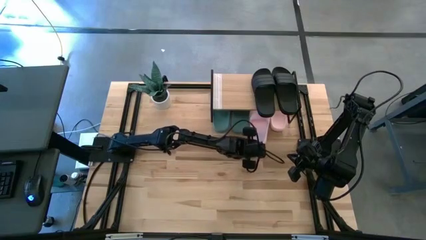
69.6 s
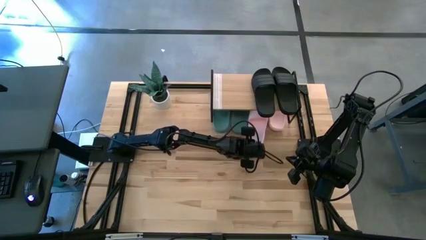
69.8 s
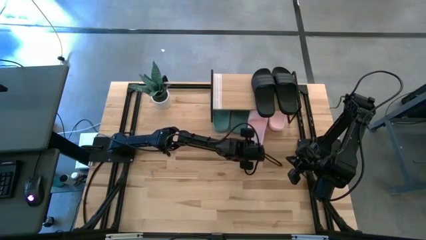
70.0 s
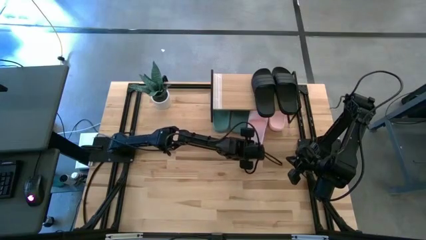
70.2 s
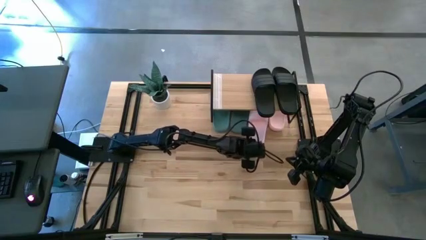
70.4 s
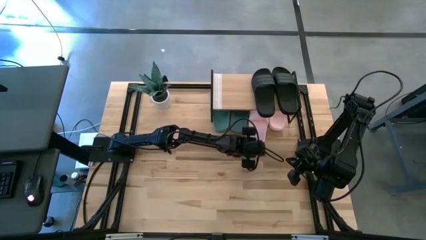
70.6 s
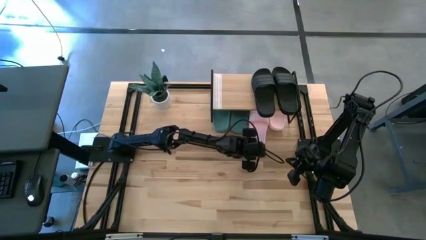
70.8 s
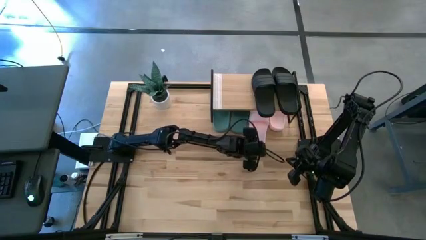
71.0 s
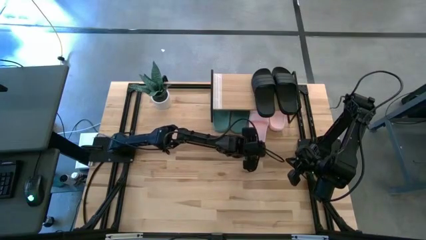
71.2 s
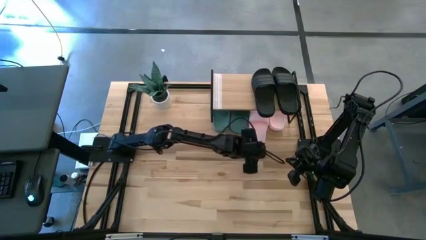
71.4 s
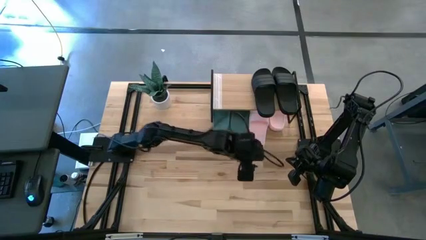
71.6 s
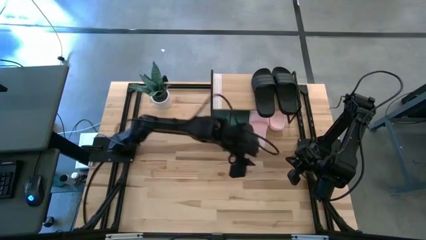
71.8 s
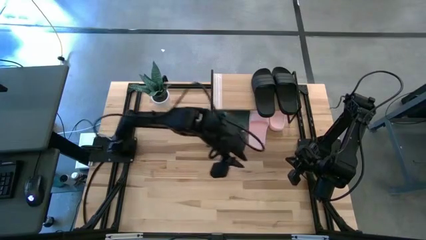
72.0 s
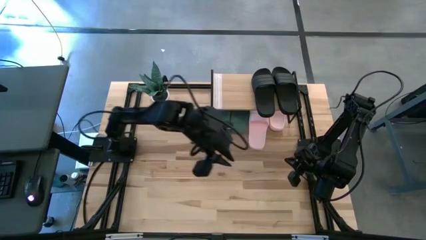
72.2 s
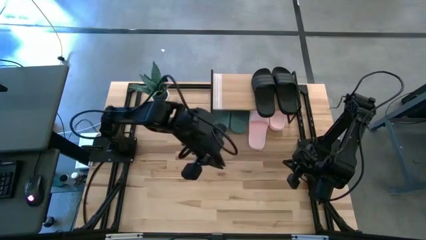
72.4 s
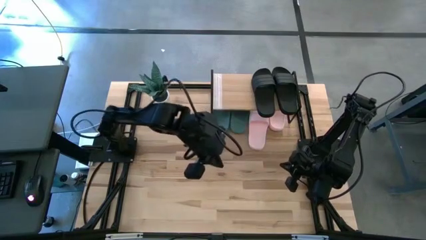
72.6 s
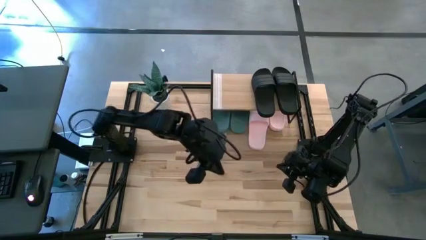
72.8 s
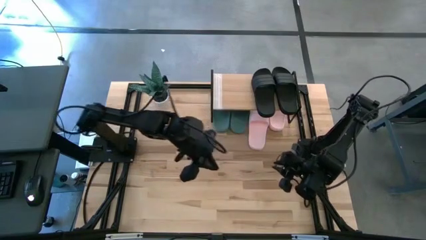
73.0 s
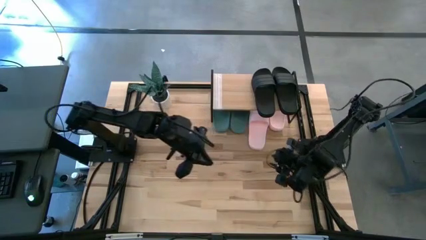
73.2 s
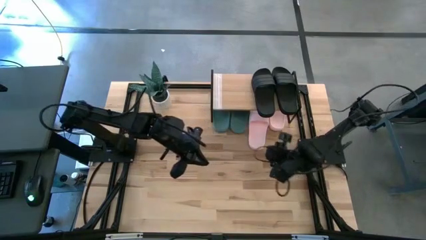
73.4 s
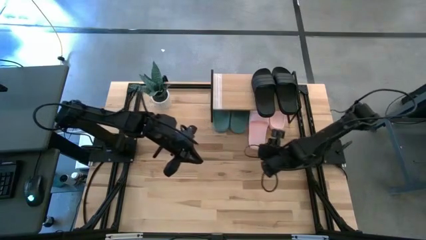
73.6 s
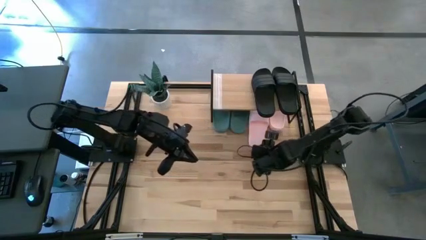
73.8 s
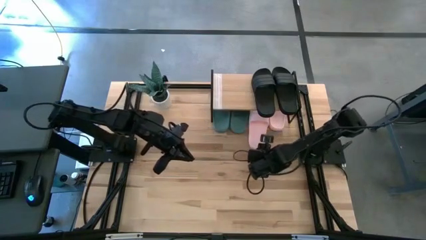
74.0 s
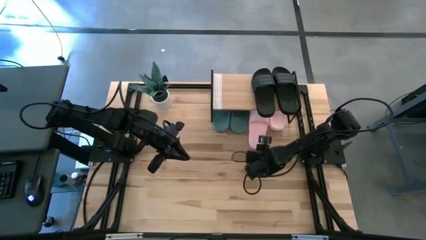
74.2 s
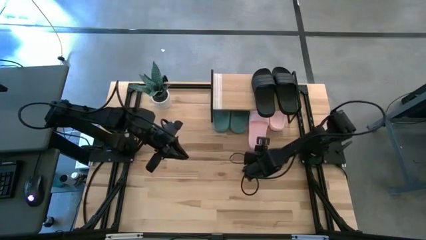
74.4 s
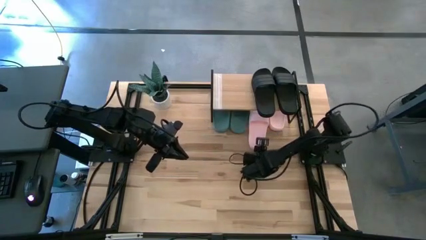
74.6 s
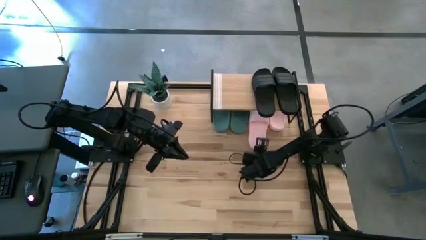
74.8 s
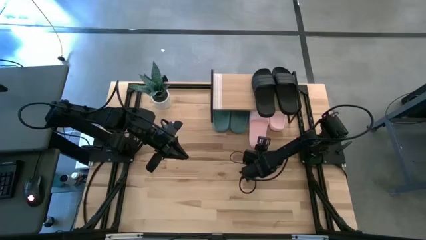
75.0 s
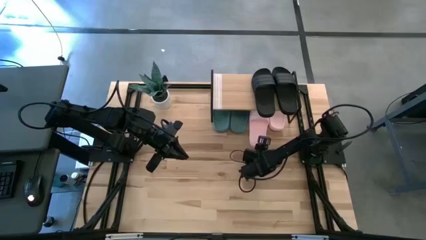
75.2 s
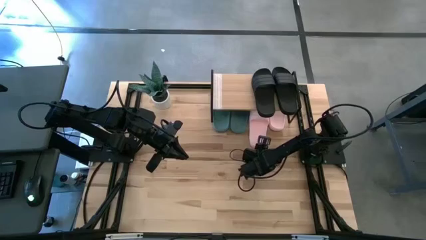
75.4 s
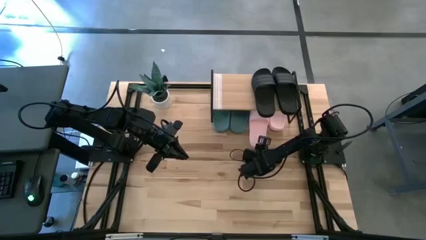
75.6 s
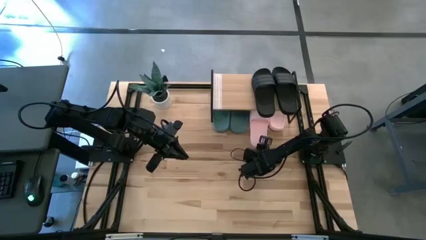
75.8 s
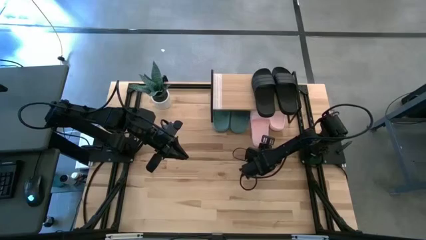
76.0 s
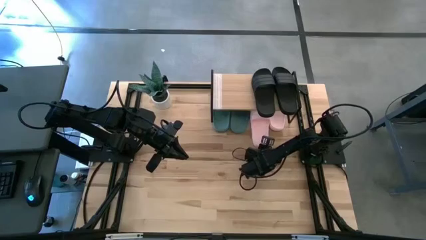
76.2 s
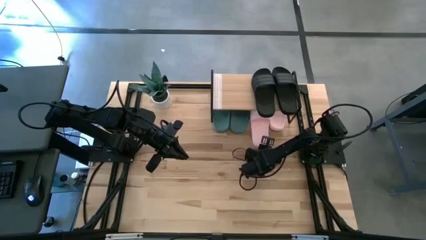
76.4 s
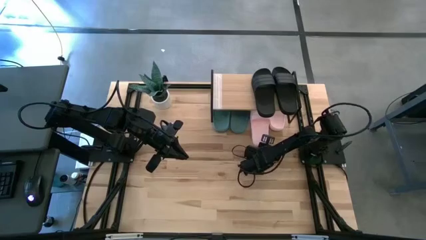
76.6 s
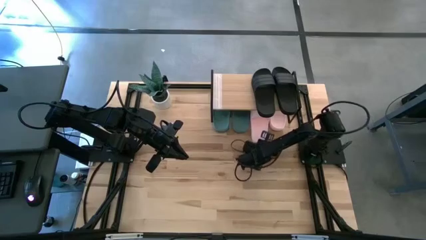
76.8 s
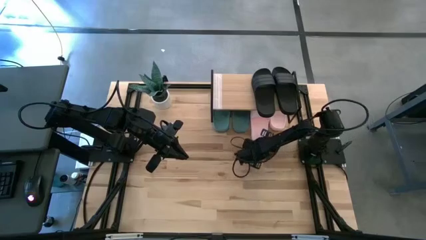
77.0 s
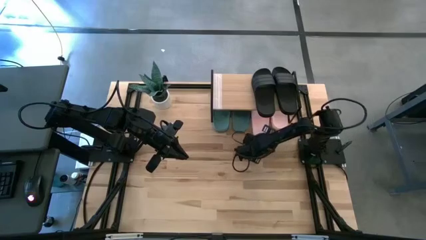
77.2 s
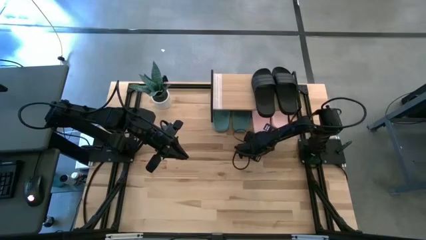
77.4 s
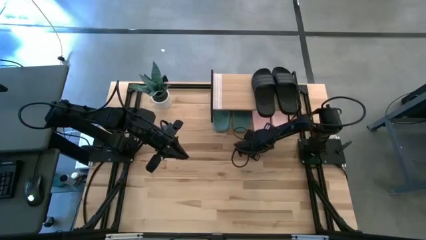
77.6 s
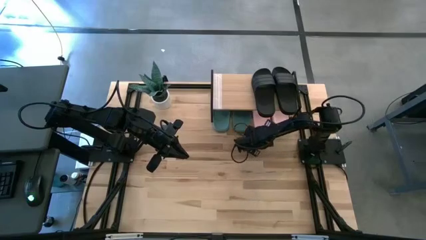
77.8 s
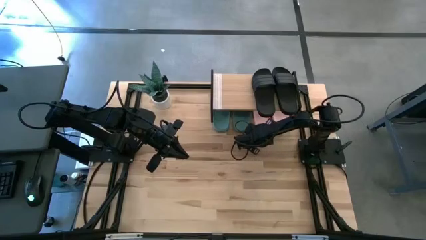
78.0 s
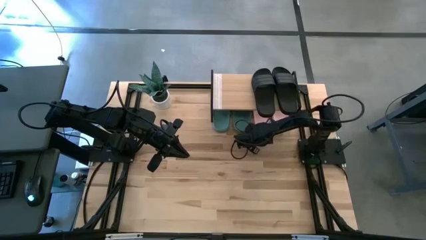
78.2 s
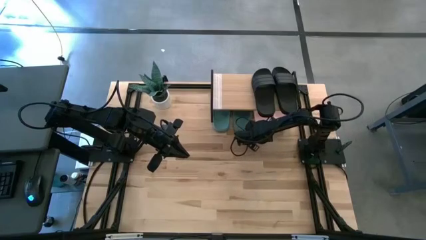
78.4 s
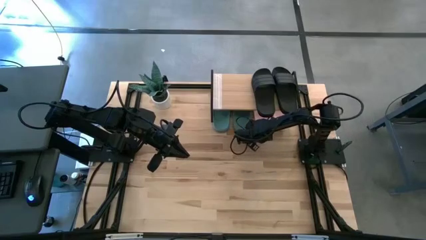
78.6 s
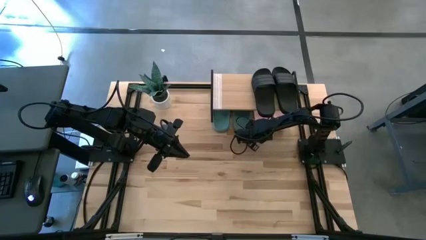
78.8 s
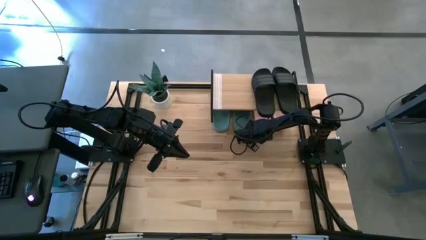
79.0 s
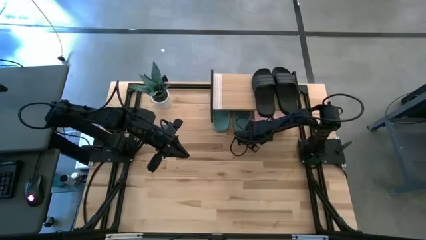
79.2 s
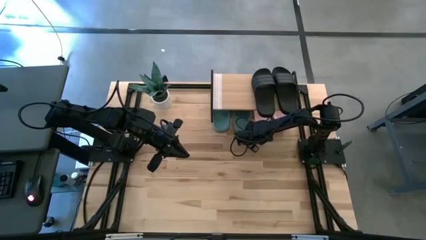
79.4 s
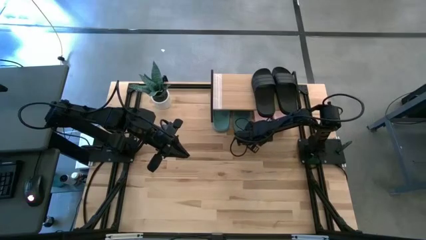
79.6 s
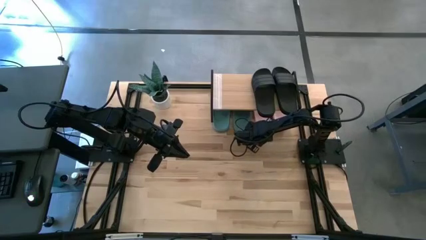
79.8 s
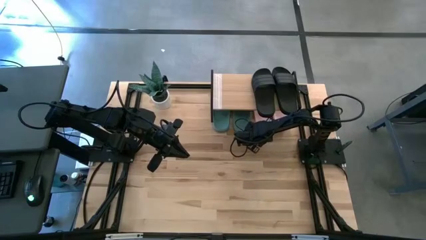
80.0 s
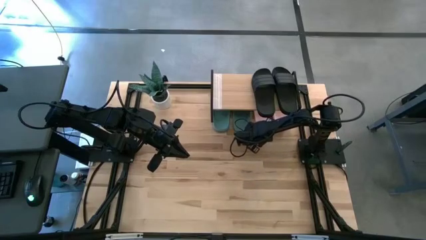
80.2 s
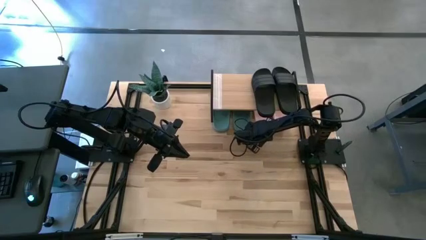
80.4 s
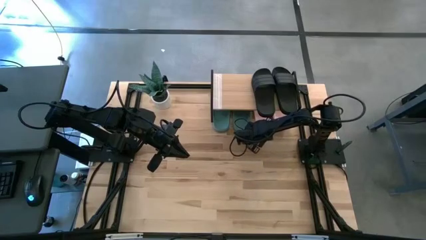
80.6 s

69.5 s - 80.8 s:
Task: Pick and place slides into the shelf
Move the pink slipper under the shelf

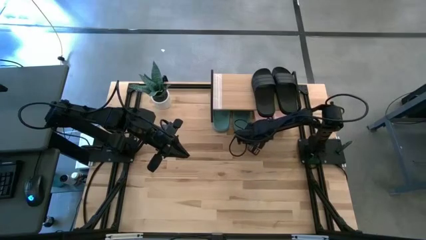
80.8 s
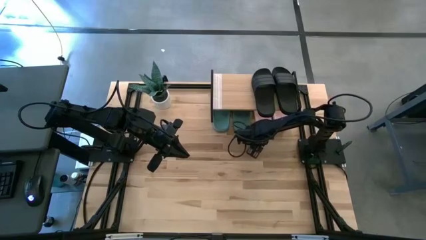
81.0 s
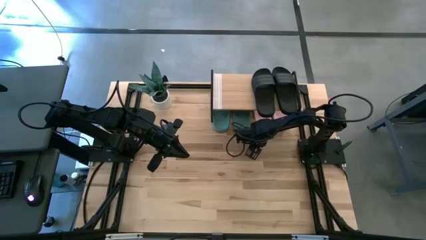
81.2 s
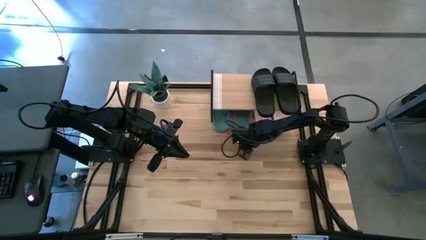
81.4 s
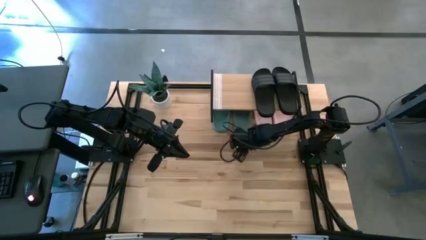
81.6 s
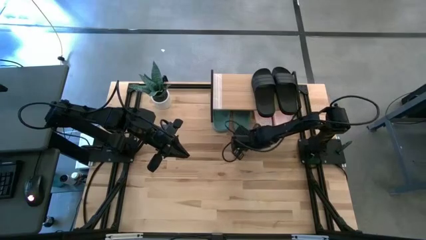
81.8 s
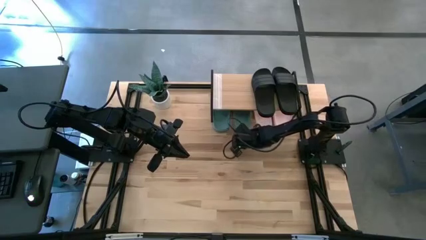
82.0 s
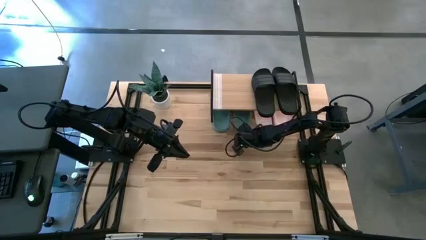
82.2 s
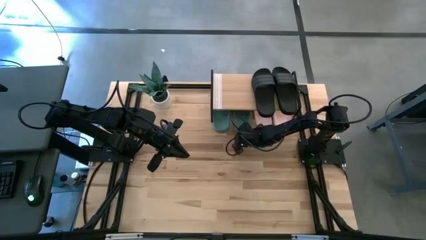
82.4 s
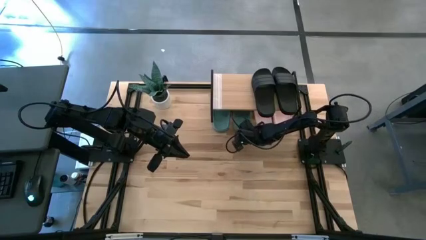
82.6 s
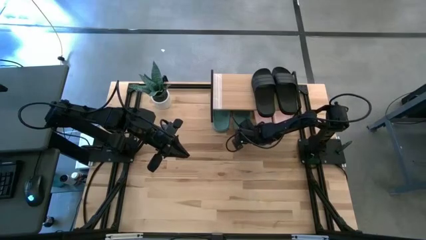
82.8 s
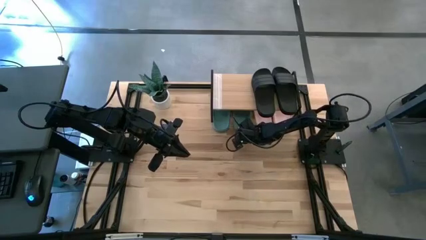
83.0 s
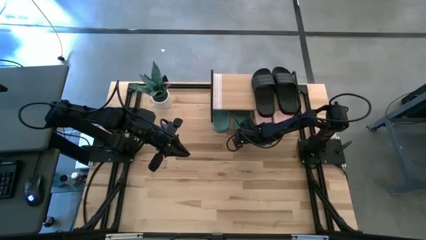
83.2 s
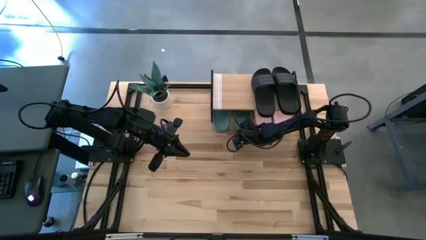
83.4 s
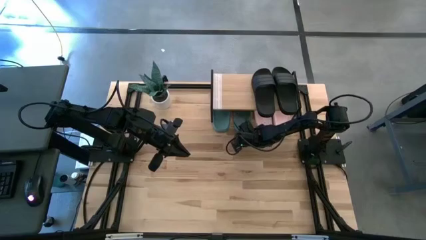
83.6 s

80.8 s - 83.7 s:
Adjust the green slipper under the shelf

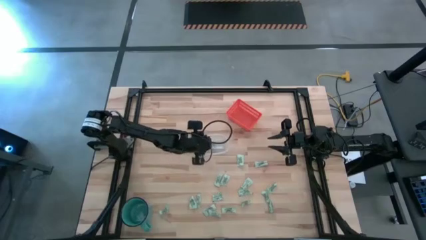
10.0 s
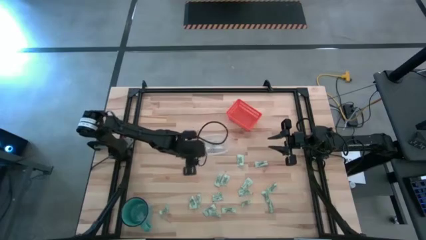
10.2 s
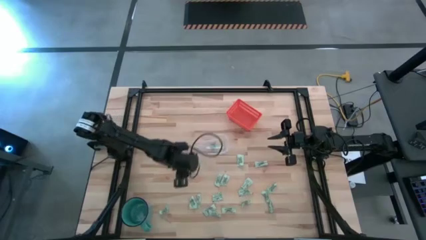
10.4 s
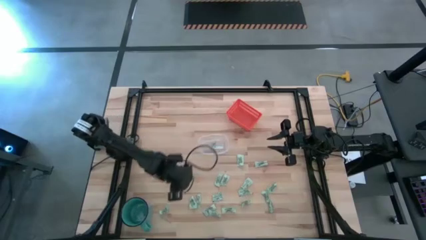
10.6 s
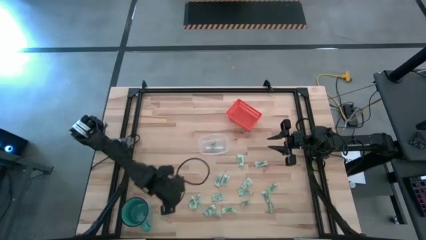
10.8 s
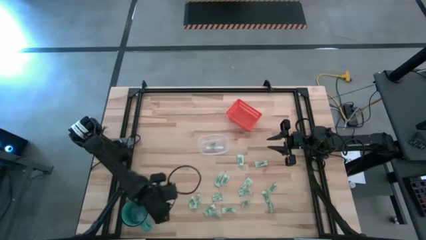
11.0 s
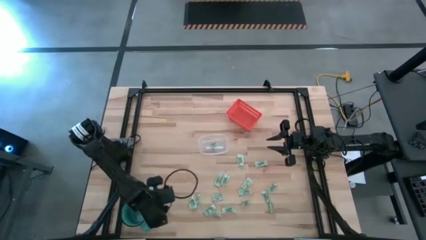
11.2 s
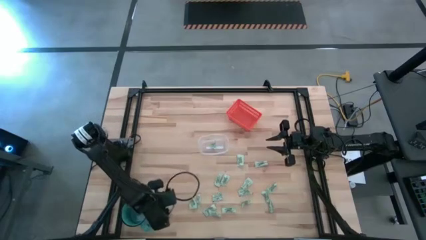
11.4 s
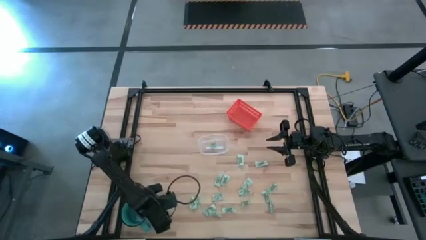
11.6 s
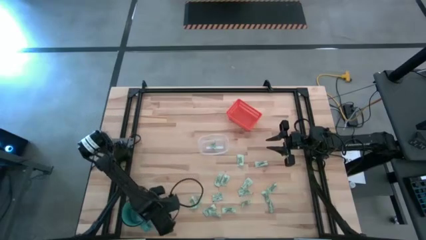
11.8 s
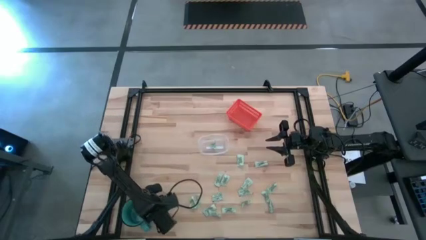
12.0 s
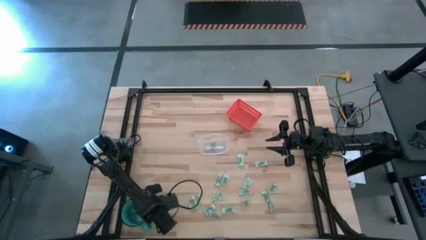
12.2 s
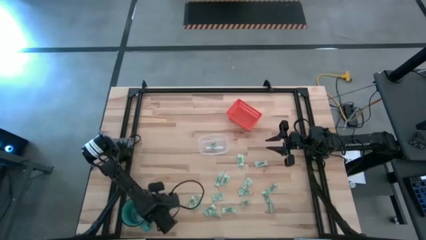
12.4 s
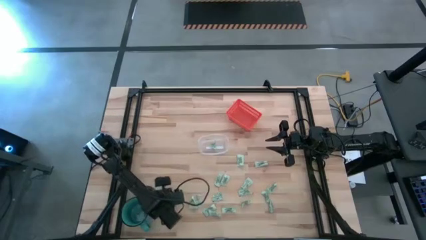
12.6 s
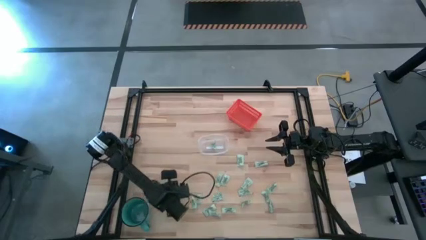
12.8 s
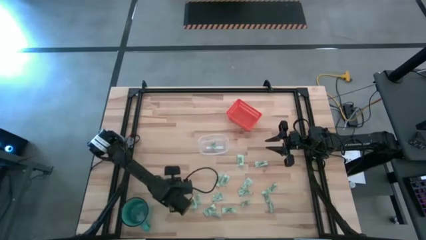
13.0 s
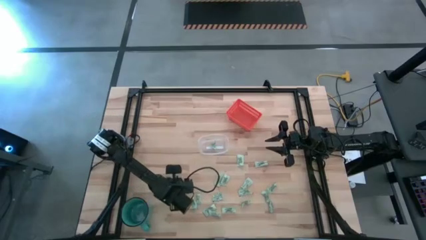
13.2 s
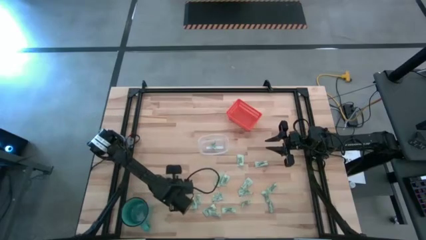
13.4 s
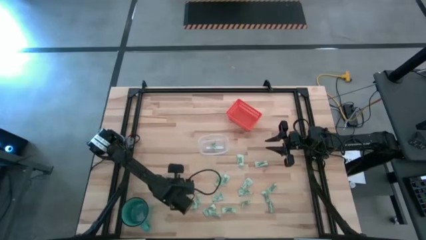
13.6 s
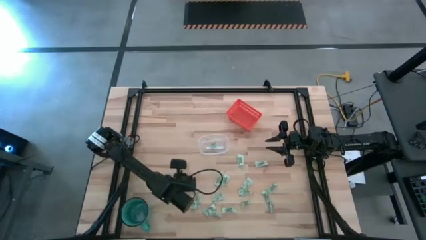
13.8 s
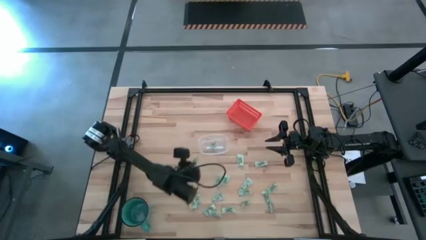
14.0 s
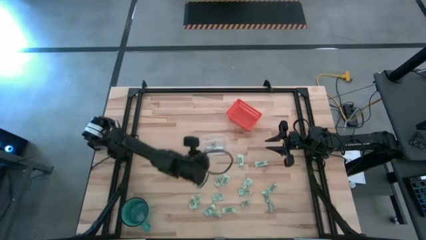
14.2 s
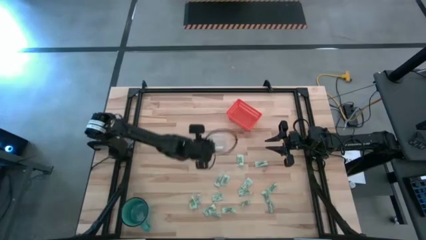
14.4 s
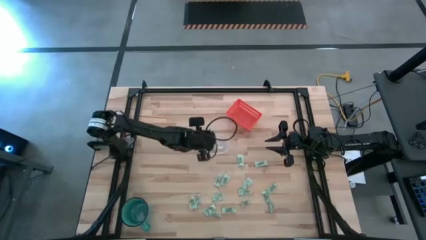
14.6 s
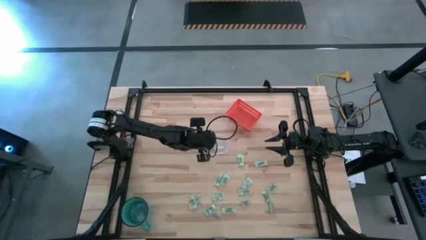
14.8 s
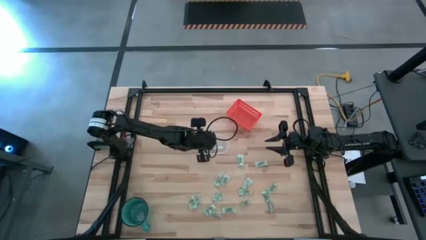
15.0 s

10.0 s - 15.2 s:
Task: Pick and place items into bin
Put the stevia packet into the transparent bin
